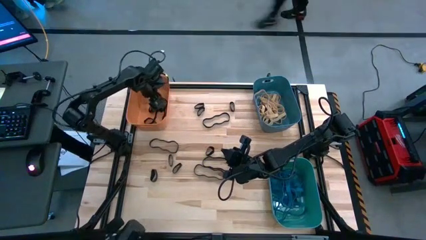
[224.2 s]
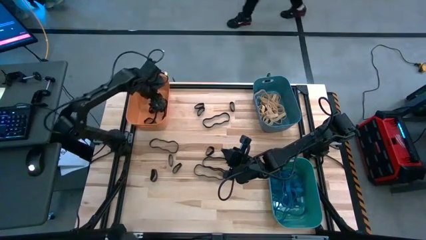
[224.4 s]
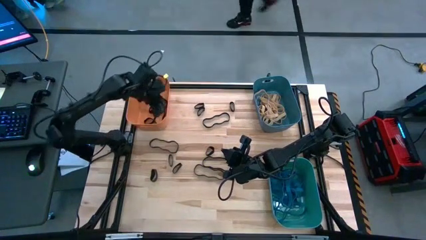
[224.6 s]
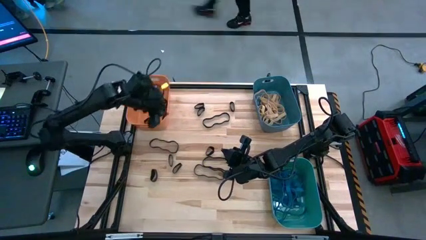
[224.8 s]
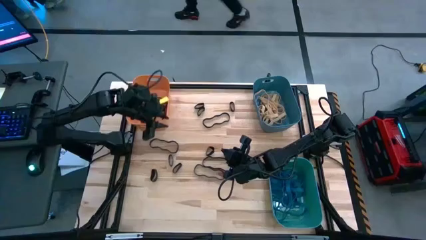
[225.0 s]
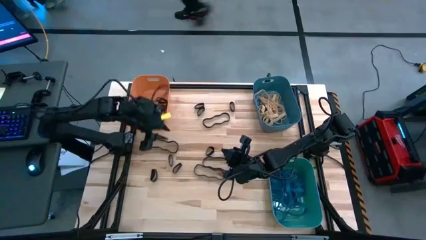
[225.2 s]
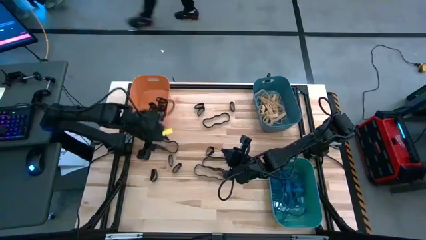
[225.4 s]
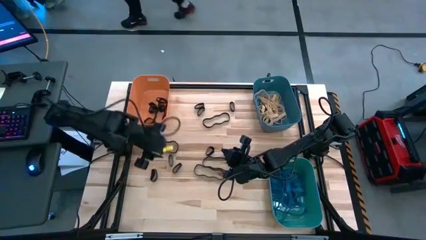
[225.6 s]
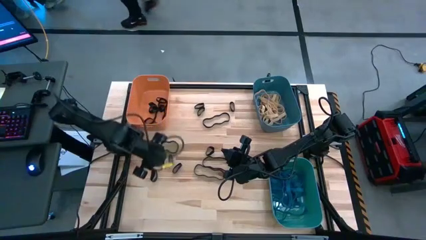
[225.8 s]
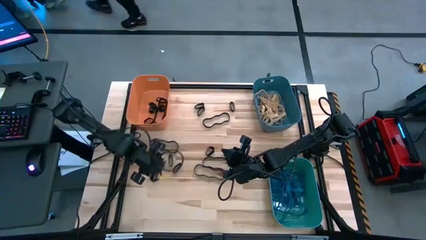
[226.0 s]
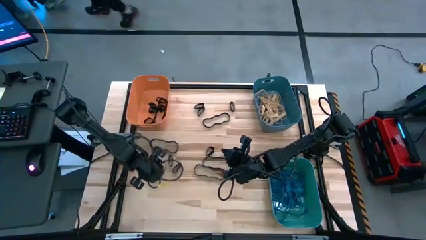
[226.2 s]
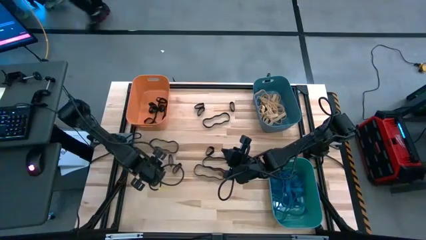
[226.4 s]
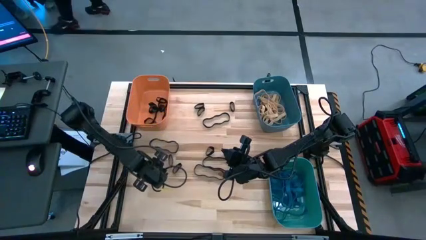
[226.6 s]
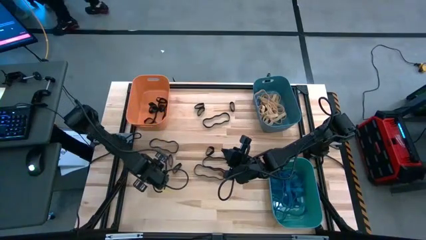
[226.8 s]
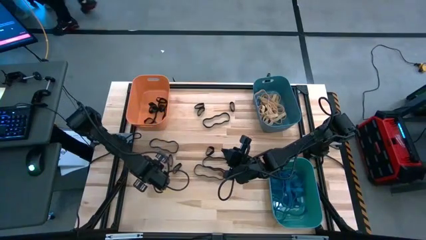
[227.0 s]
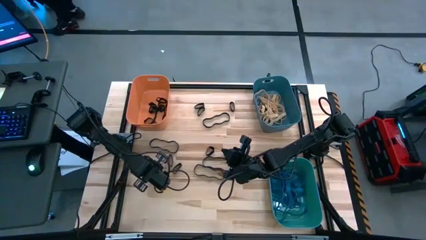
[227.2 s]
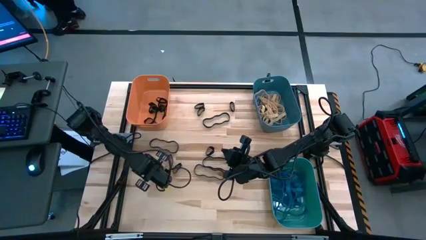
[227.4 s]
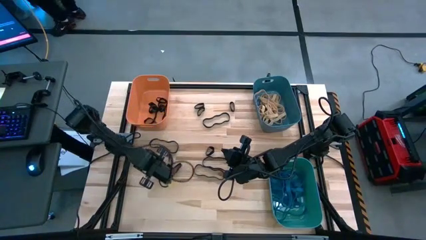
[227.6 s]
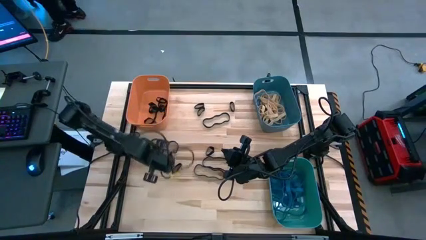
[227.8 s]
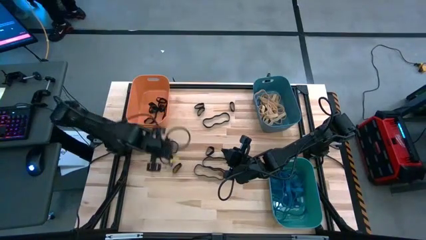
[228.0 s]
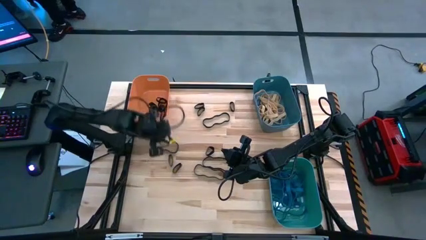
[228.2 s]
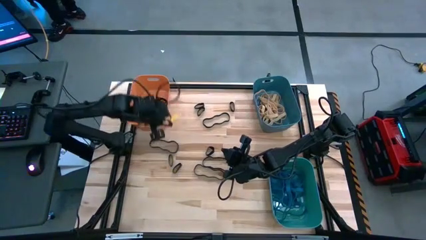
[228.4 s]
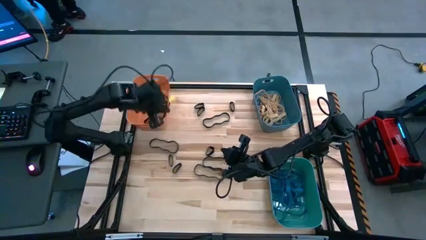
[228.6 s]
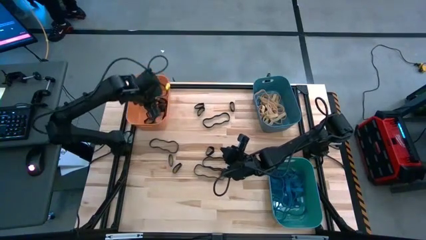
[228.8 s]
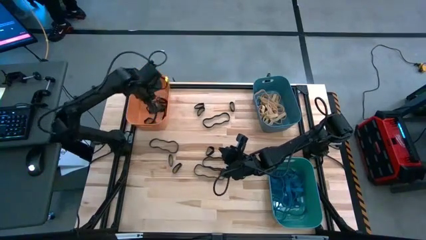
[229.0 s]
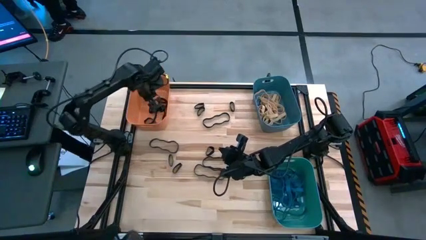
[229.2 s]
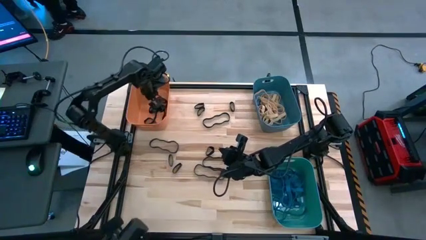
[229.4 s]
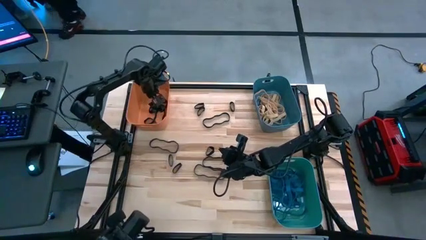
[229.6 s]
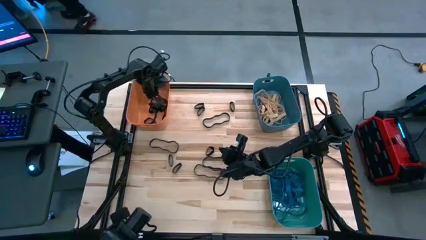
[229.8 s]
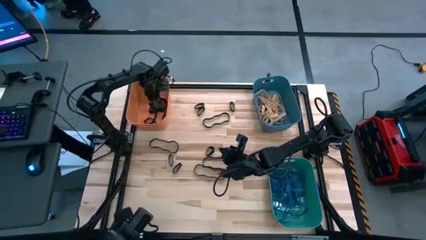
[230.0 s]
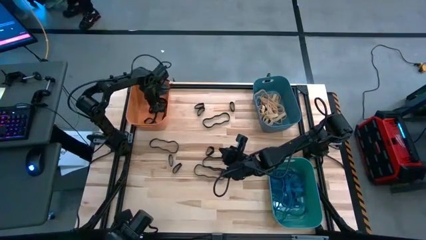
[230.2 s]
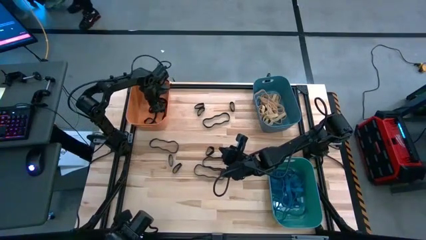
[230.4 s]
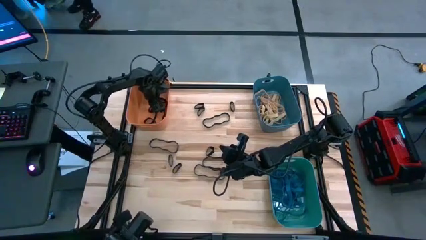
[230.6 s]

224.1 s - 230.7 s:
Task: Sort rubber bands into baskets
Put the black rubber band into the orange bin

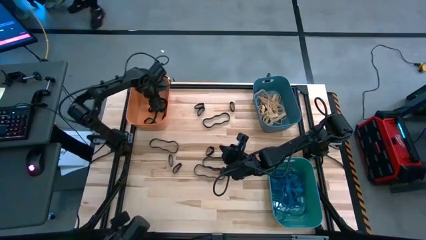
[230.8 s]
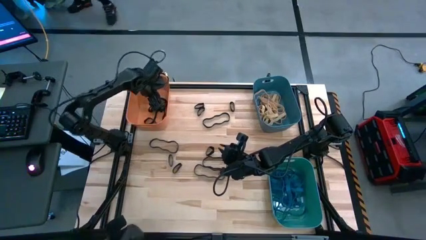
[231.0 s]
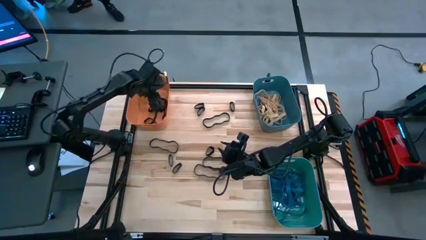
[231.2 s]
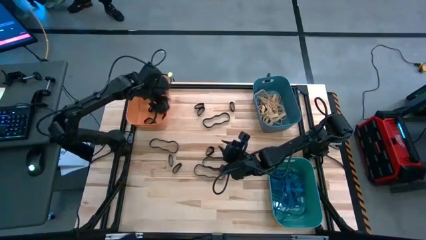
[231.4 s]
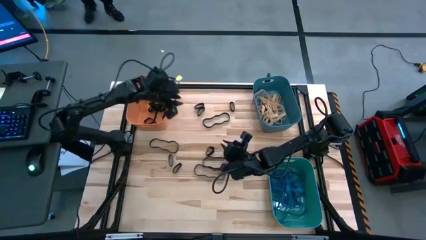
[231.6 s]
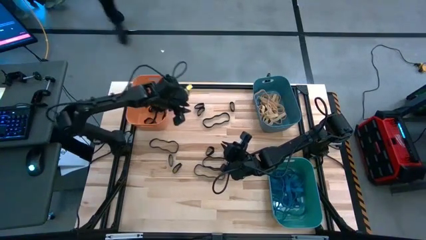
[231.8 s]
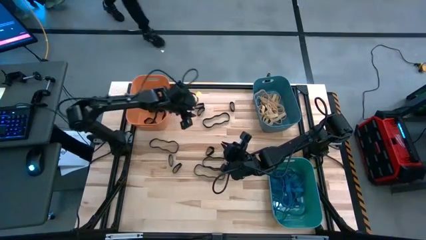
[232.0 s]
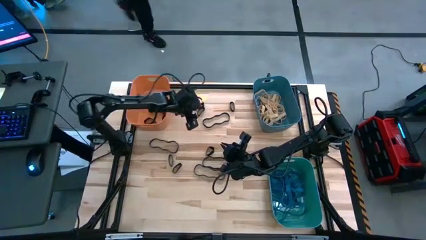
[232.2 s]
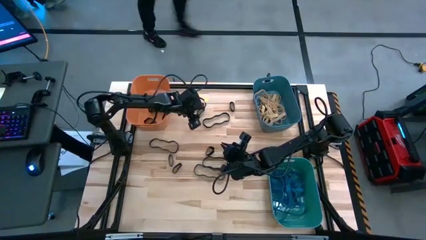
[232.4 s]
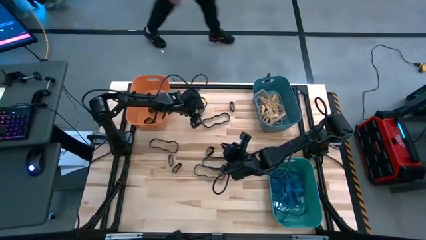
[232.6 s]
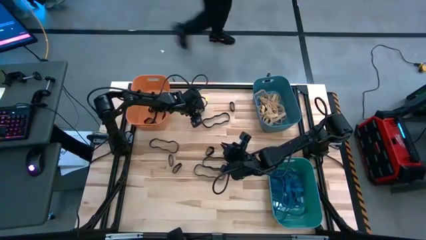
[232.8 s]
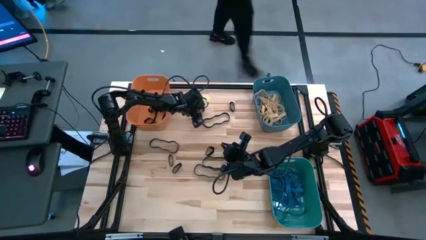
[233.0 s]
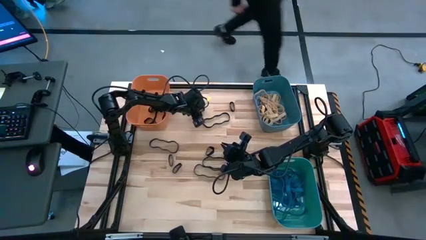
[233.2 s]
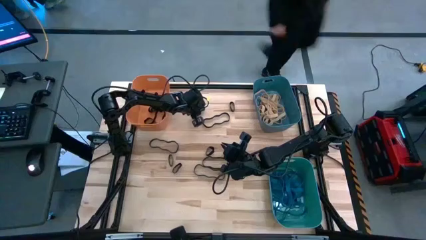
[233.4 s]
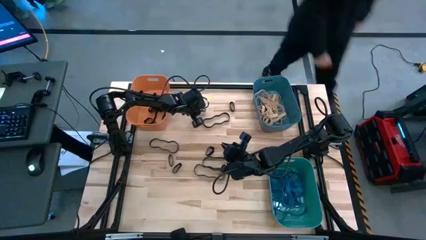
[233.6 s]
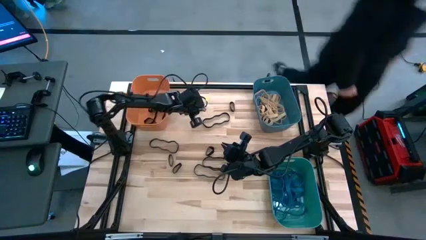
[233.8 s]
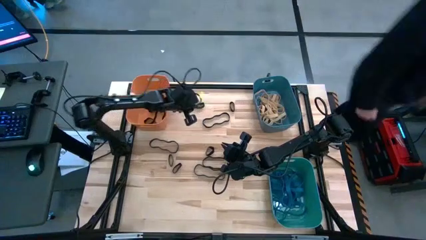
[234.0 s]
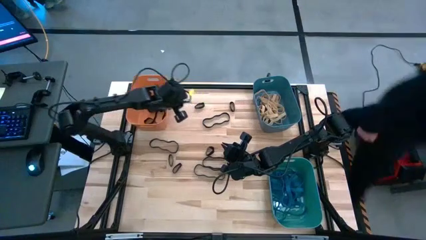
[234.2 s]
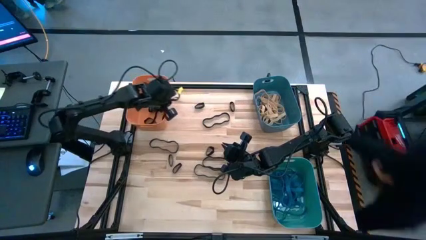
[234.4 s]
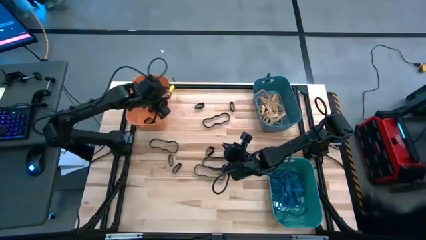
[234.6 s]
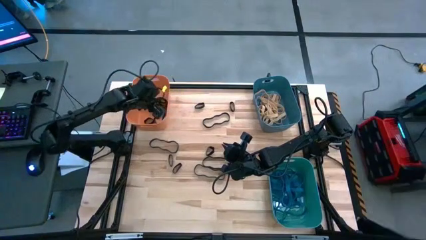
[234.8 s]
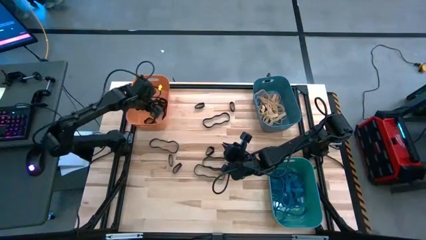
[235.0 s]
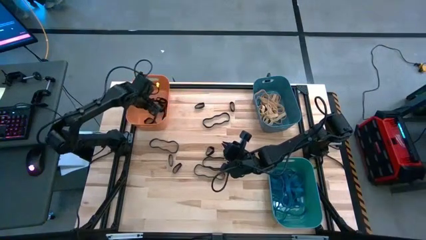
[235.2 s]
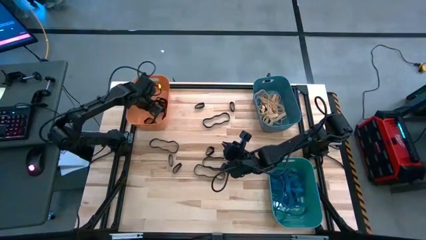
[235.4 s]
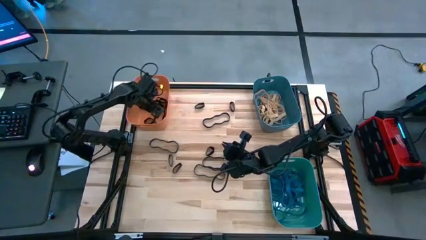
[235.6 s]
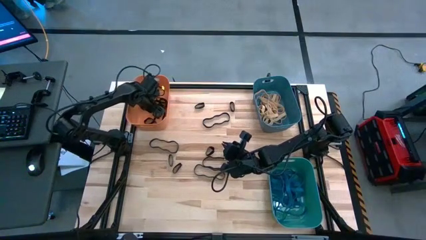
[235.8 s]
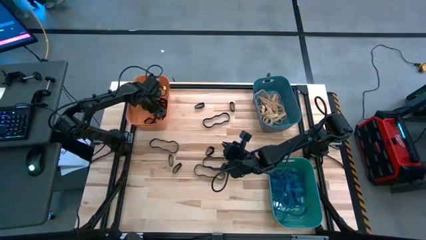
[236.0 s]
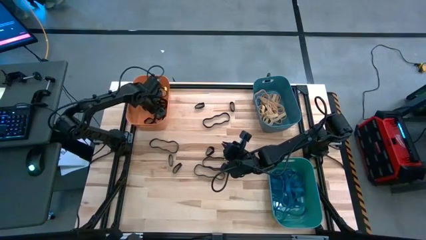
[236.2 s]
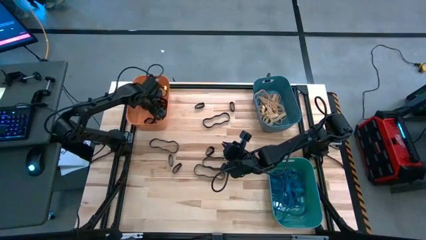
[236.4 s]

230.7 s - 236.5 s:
Put the black rubber band into the orange bin

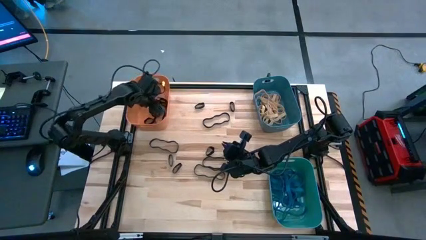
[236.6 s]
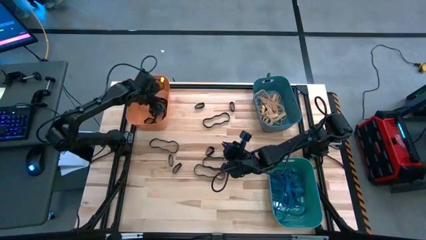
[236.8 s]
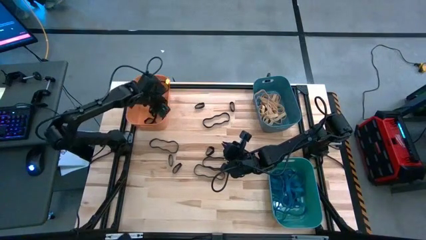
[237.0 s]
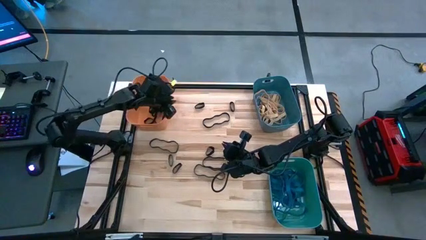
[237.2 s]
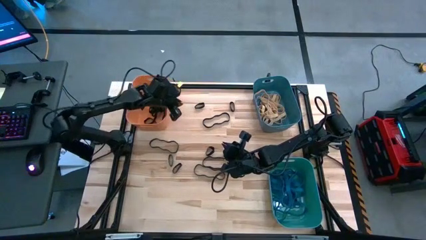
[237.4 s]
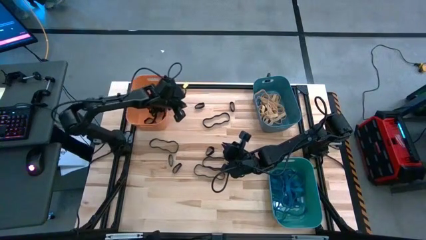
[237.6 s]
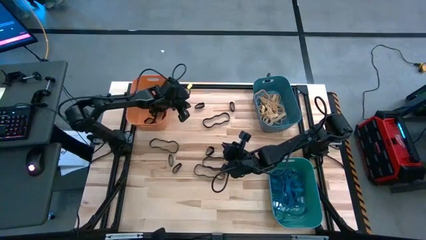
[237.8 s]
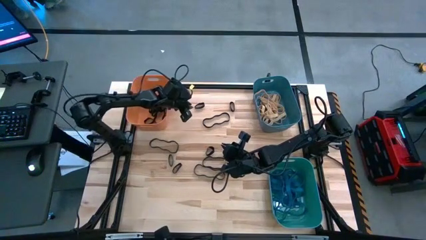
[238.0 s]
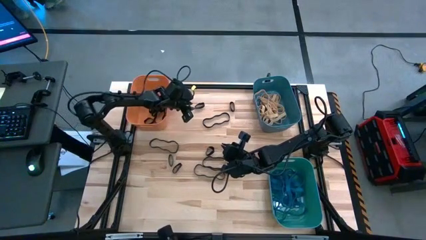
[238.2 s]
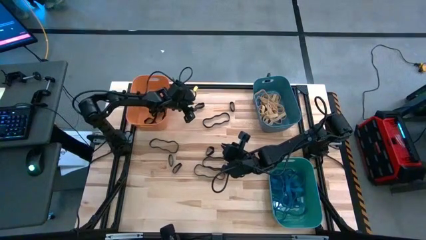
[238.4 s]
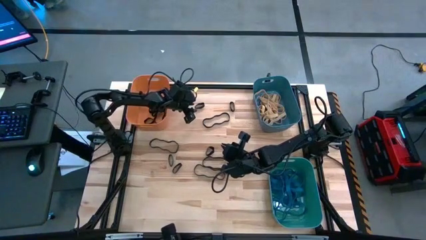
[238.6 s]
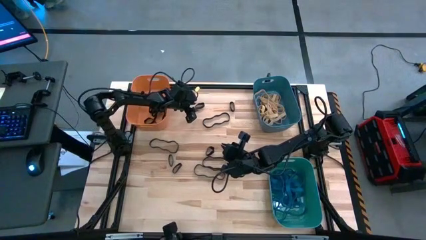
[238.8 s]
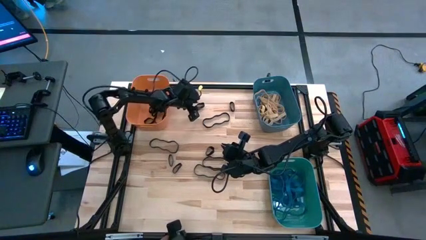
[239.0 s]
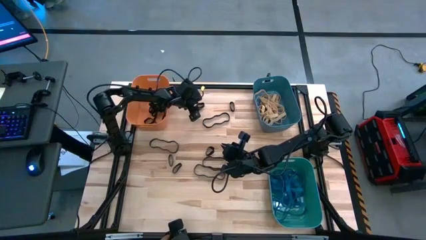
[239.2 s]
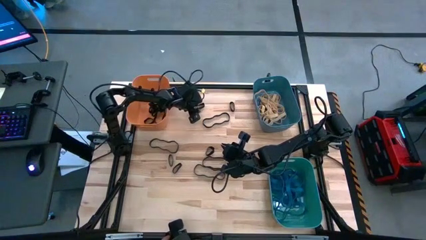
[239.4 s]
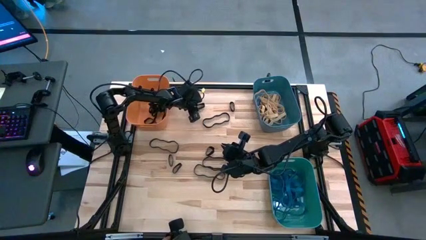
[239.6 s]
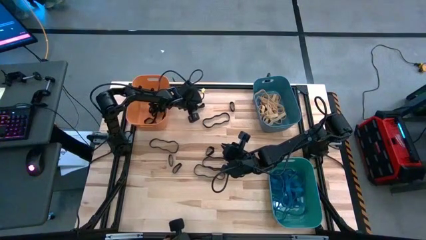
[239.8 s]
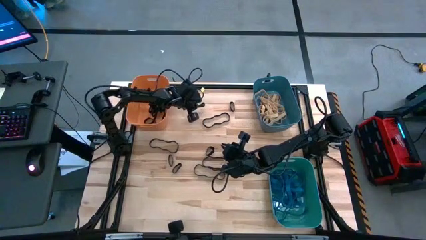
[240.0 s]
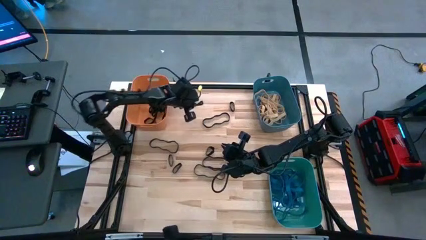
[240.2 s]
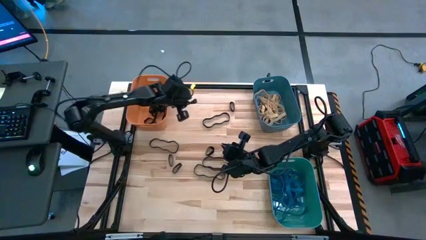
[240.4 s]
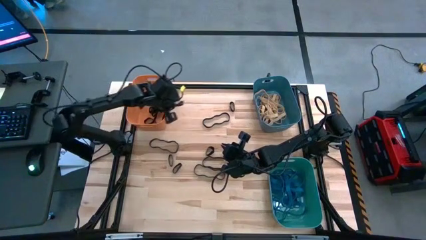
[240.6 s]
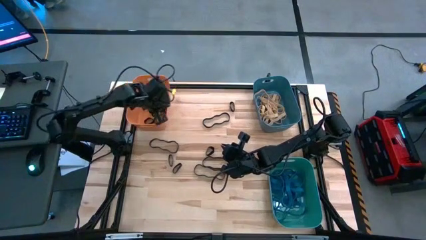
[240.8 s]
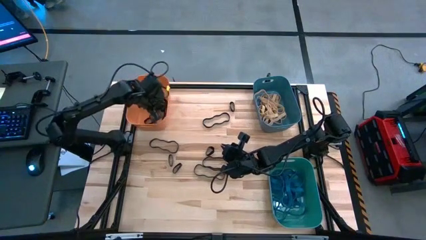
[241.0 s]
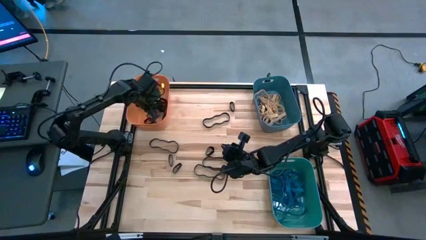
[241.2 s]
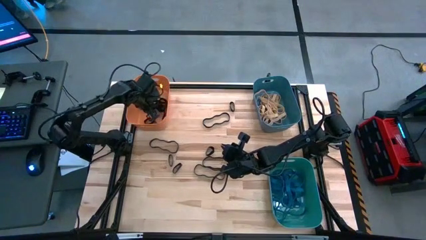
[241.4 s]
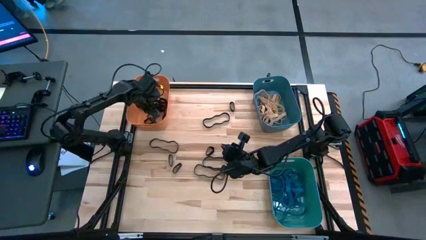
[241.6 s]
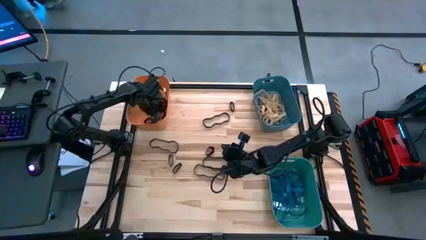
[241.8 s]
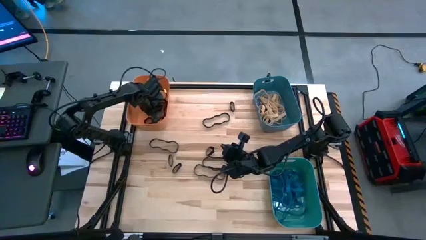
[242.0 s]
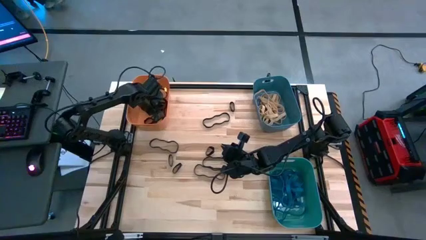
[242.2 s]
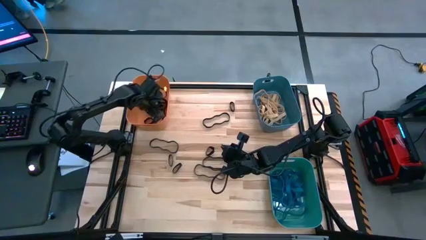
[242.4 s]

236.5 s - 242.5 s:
Put the black rubber band into the orange bin
